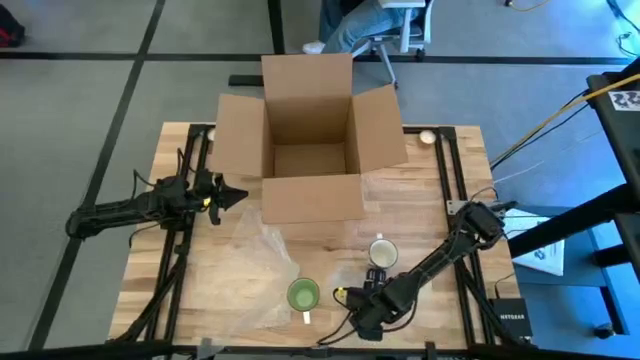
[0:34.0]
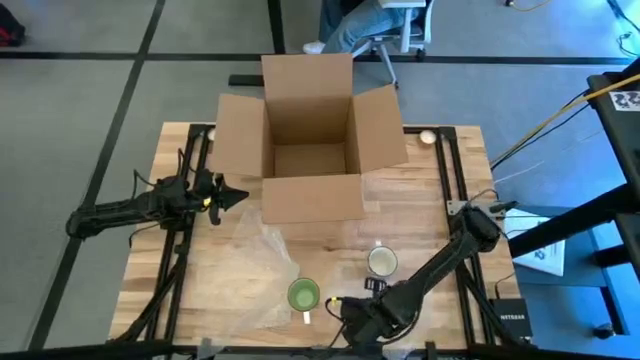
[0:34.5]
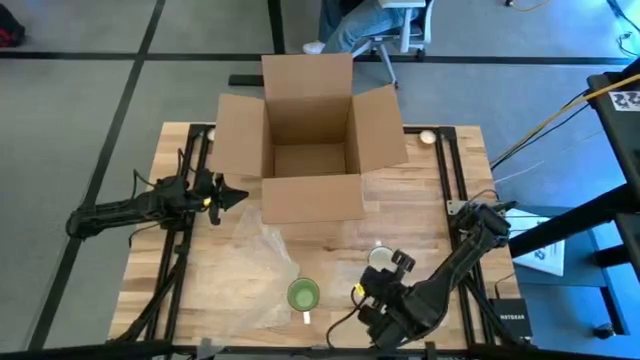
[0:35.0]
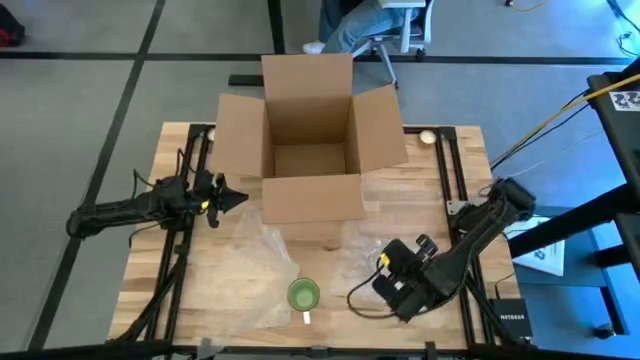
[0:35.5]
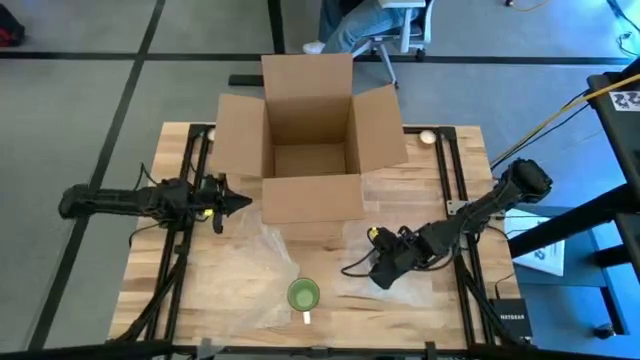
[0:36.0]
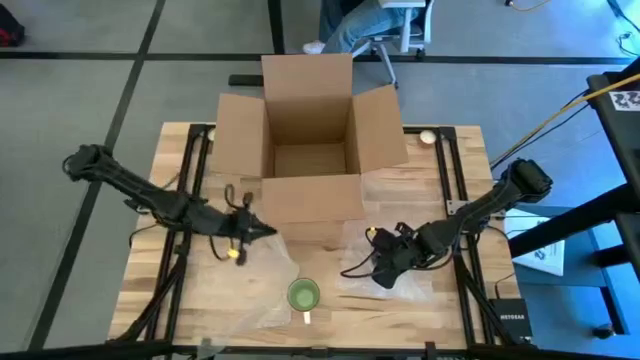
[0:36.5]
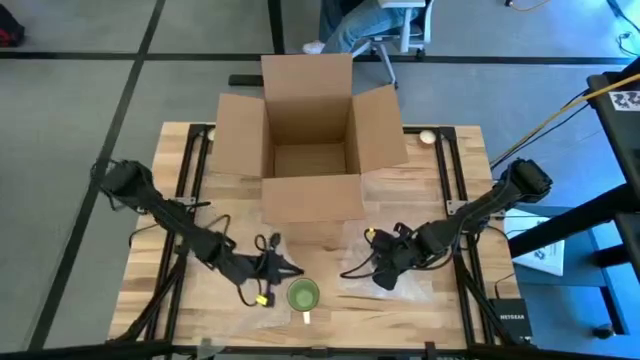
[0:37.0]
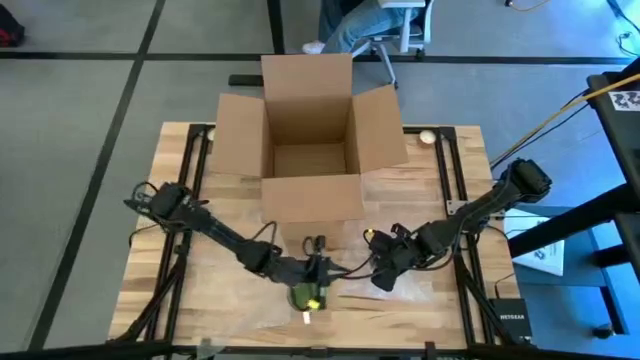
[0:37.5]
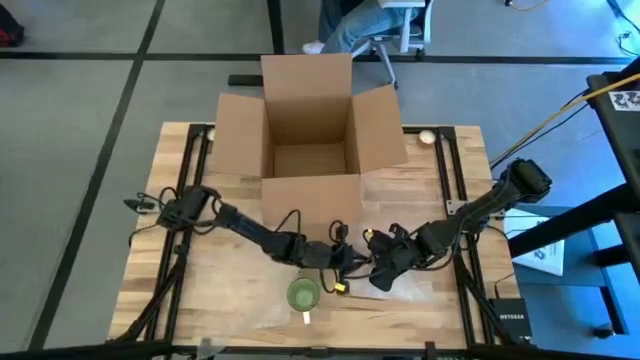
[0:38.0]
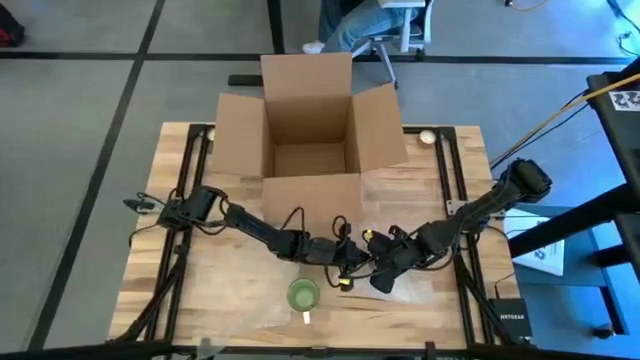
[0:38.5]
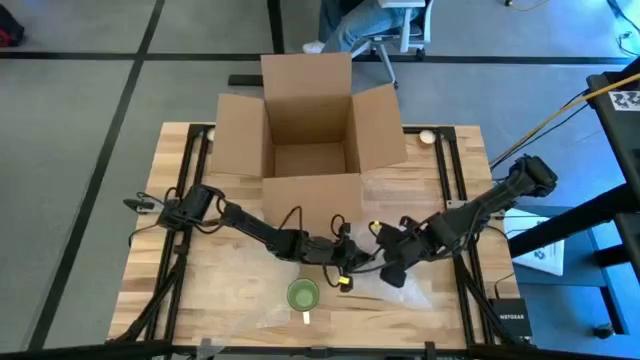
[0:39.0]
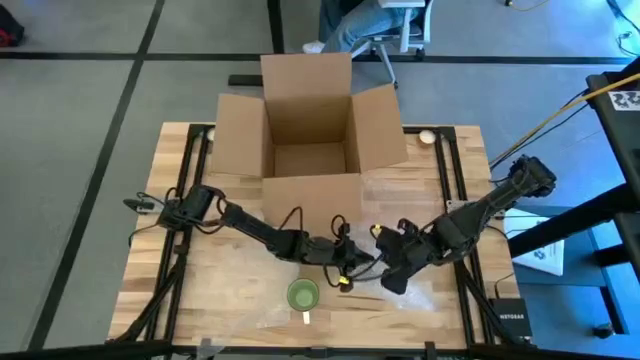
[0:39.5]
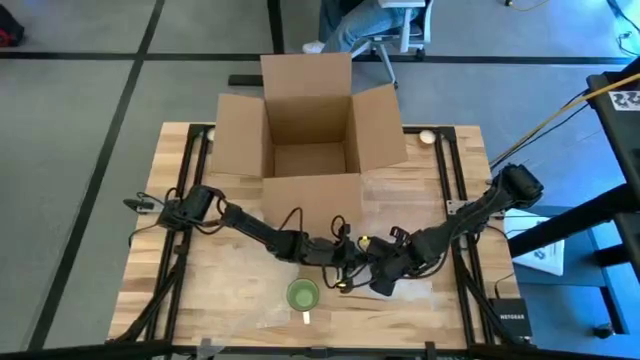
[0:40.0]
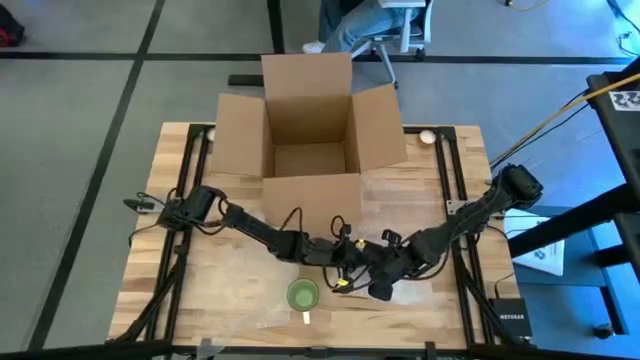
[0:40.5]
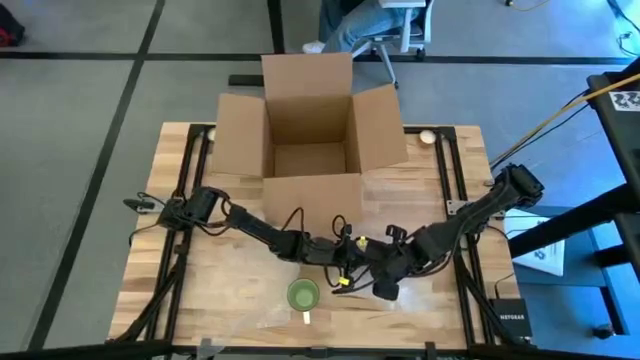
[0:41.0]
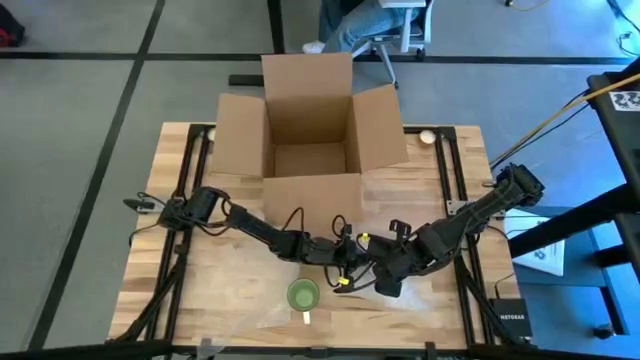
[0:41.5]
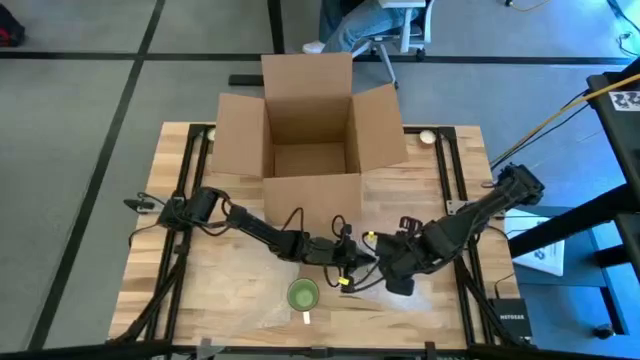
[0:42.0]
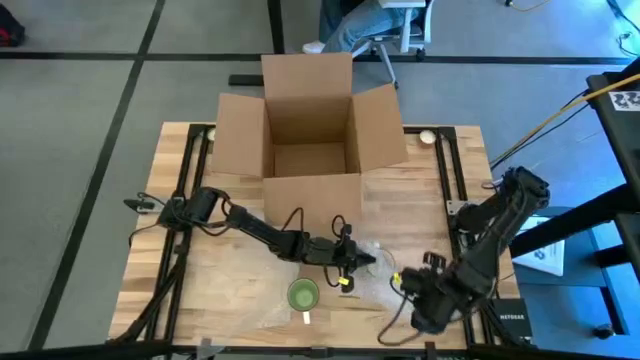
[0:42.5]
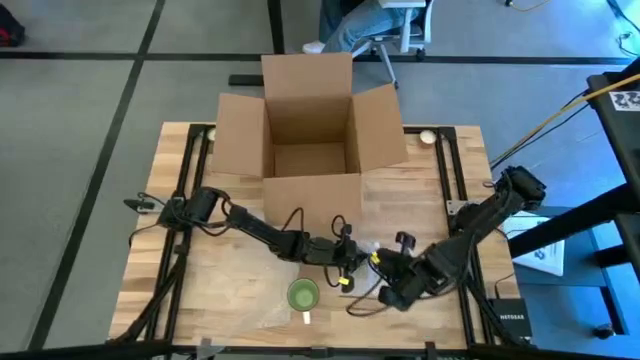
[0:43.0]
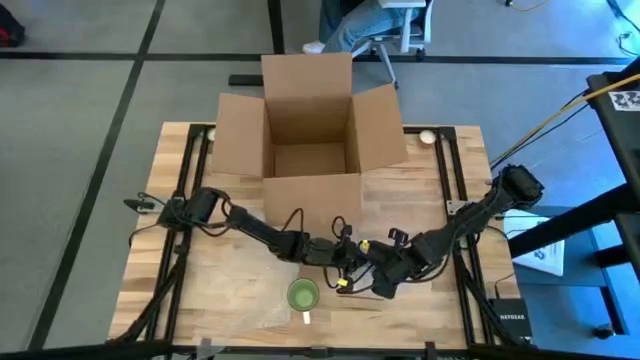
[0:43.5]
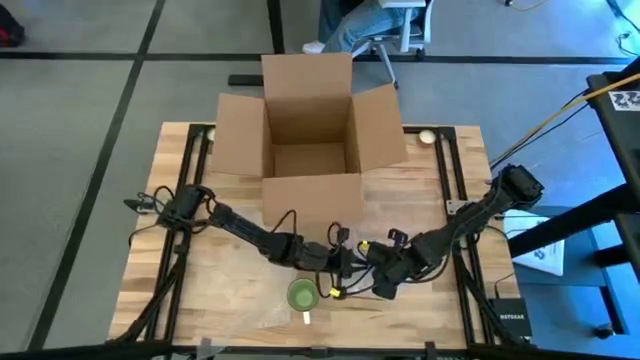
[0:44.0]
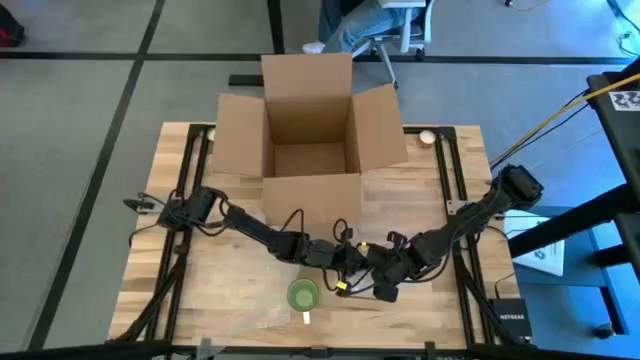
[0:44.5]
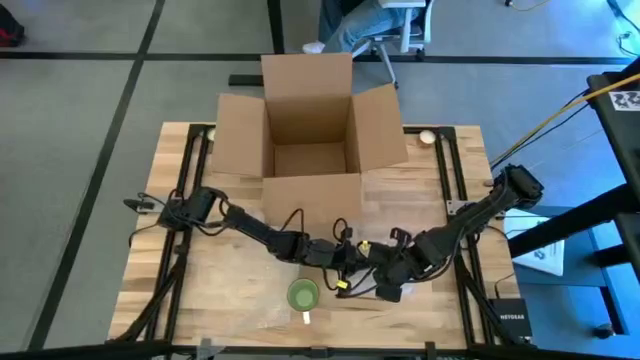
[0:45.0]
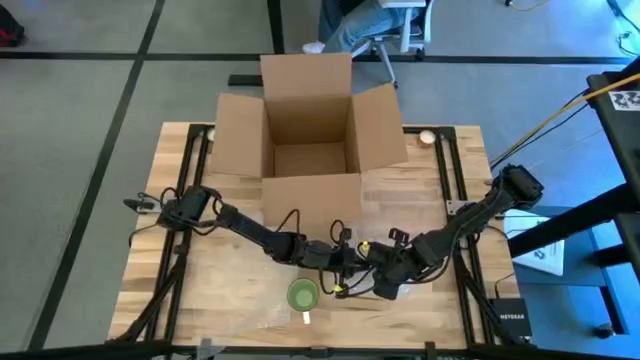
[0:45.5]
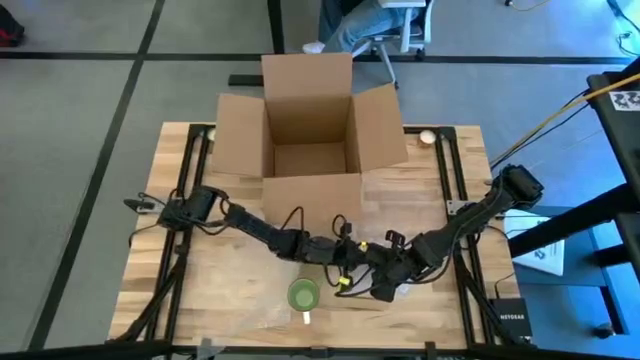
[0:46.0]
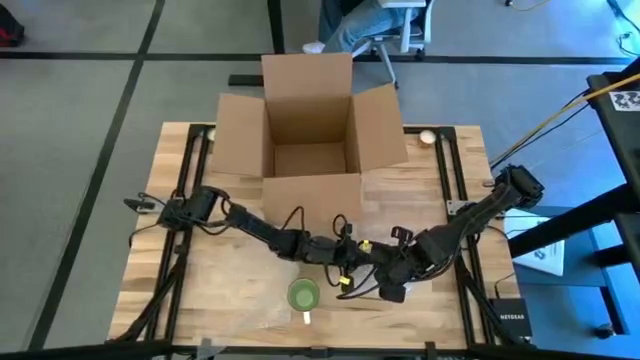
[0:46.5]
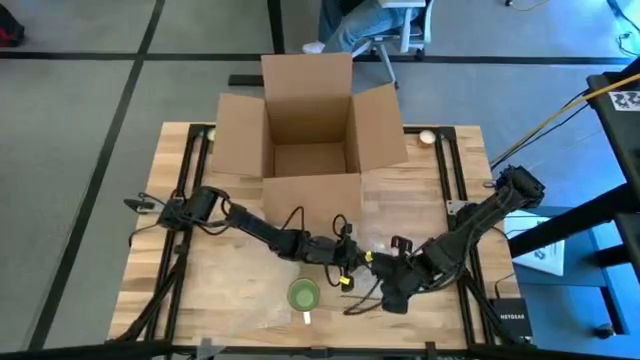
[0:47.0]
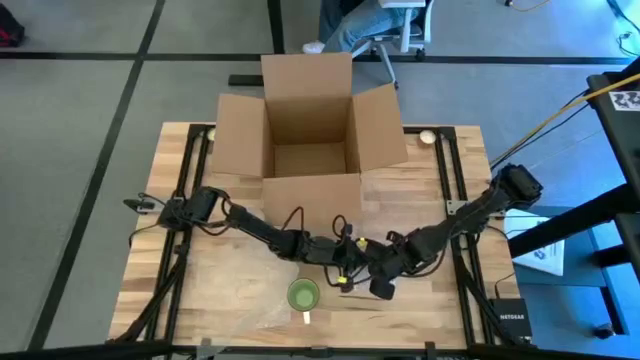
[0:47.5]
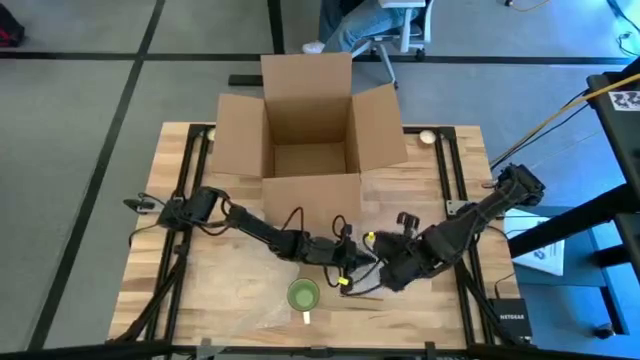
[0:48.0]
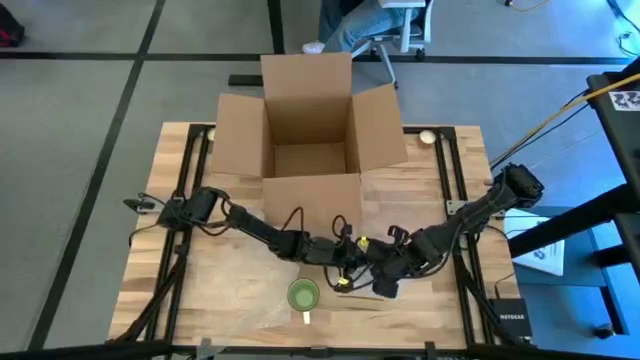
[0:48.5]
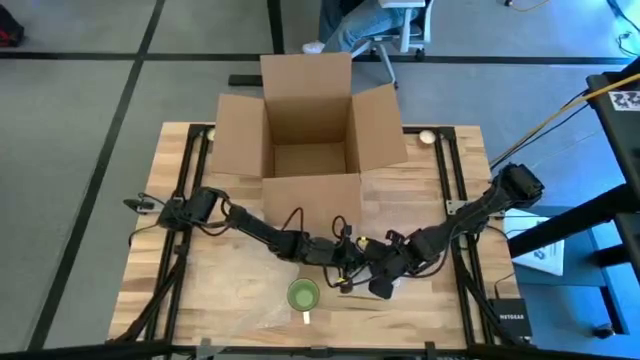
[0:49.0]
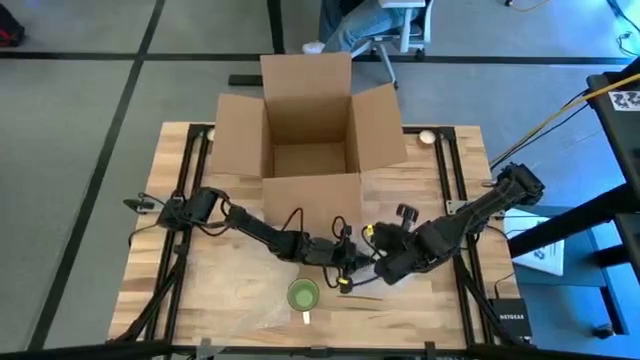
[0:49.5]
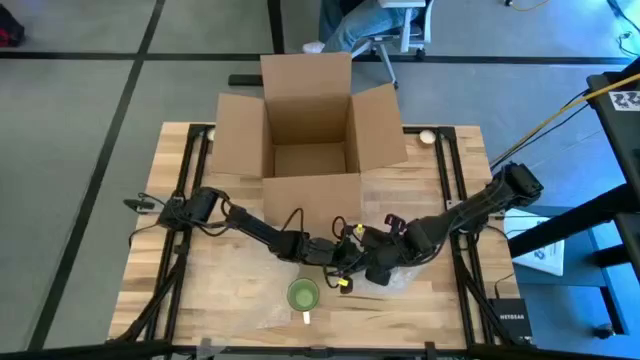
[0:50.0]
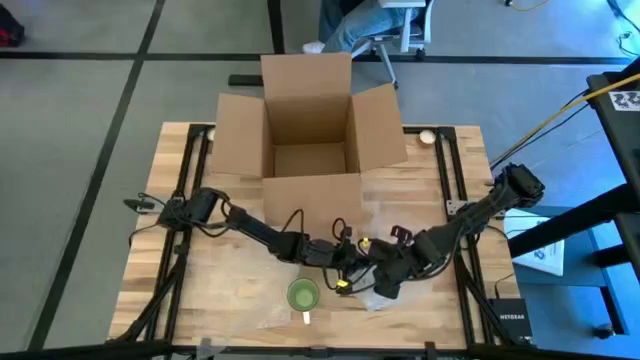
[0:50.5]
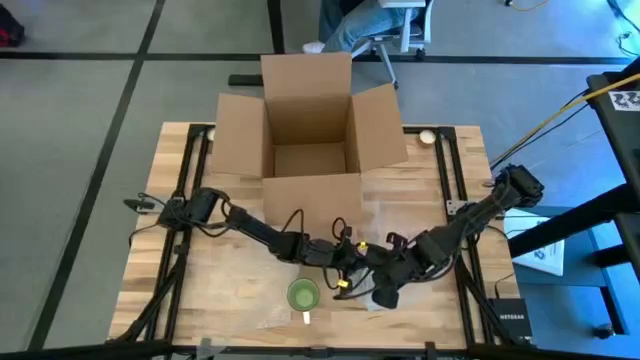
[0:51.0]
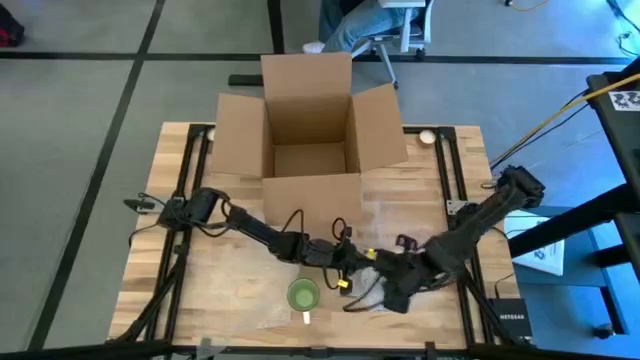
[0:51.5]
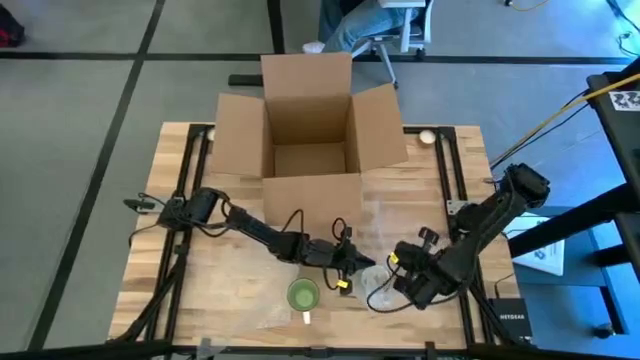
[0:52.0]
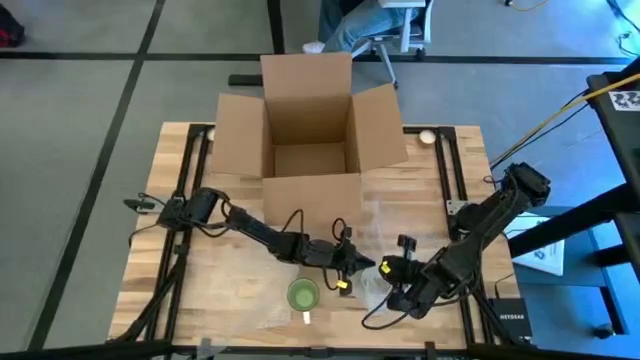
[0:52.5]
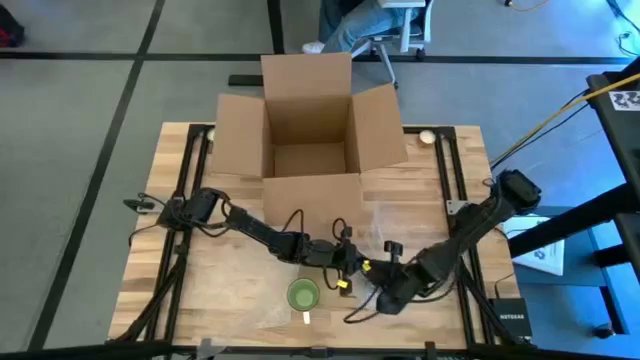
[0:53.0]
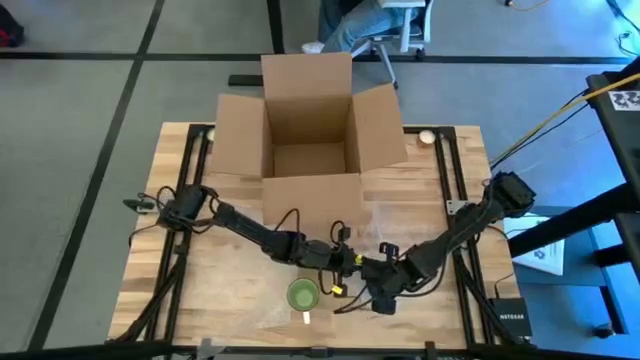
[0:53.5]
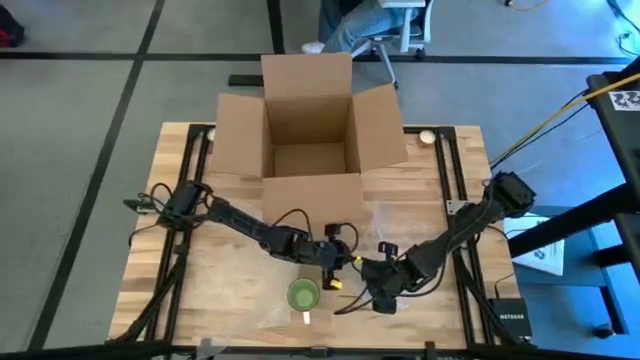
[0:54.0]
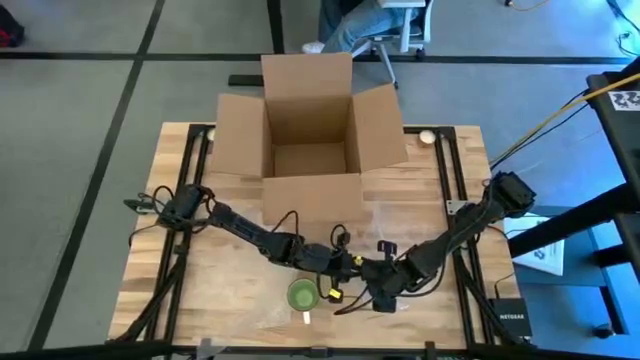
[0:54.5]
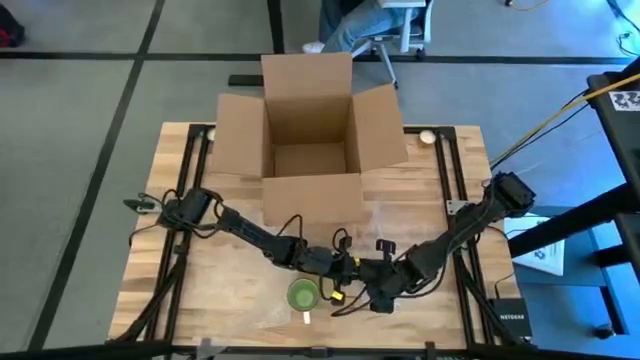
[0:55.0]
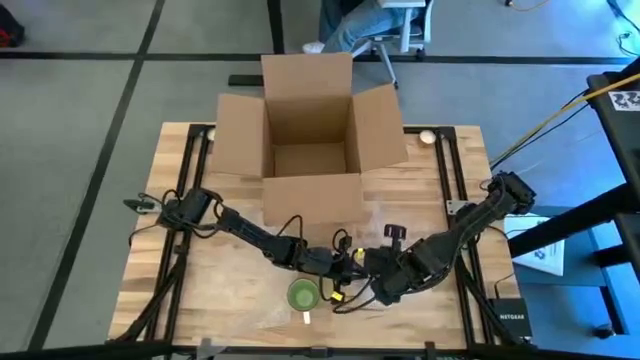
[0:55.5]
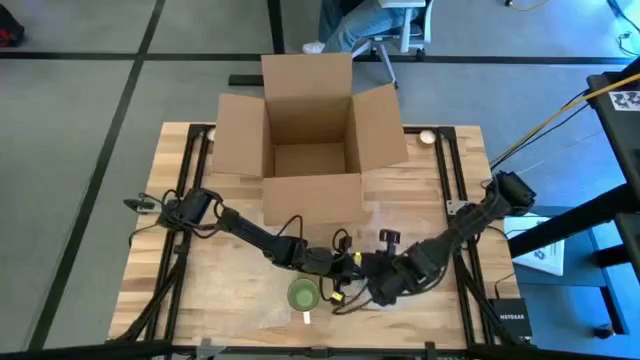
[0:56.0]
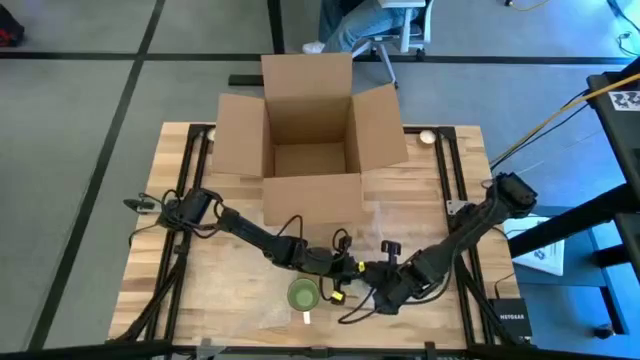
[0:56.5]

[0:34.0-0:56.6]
Task: wrap mug
Wrap the blue mug with the right transparent bubble wrap
